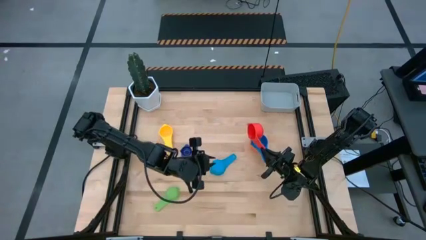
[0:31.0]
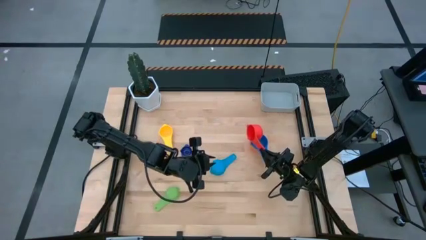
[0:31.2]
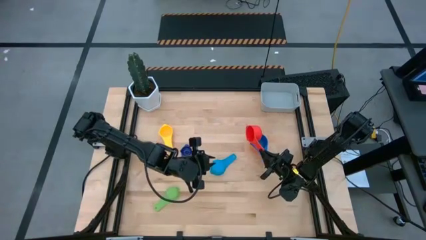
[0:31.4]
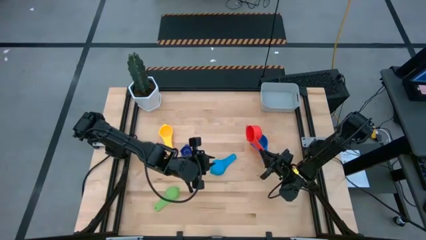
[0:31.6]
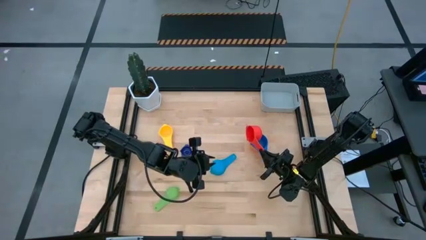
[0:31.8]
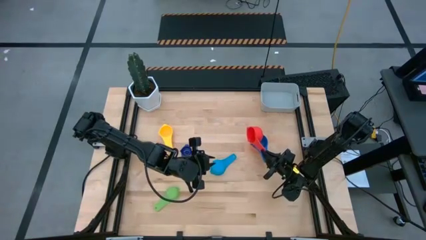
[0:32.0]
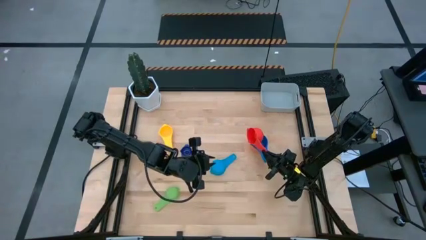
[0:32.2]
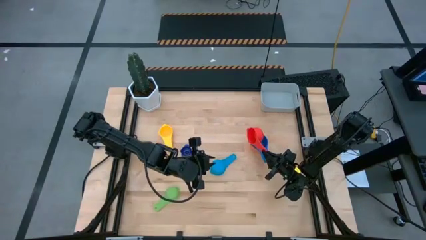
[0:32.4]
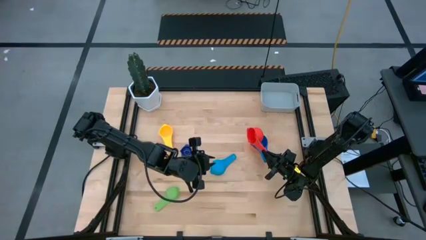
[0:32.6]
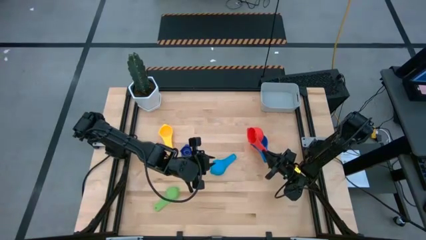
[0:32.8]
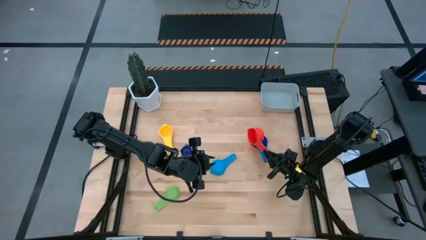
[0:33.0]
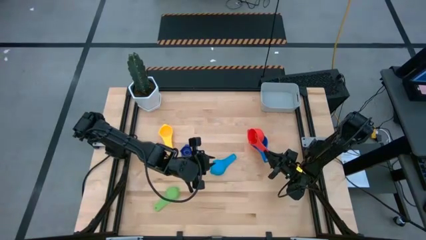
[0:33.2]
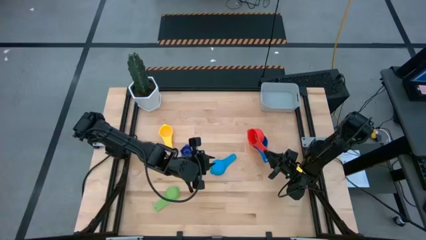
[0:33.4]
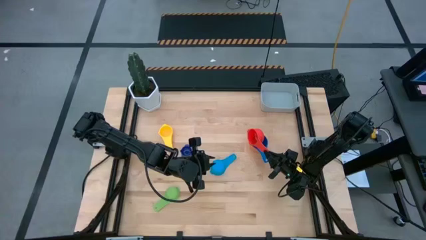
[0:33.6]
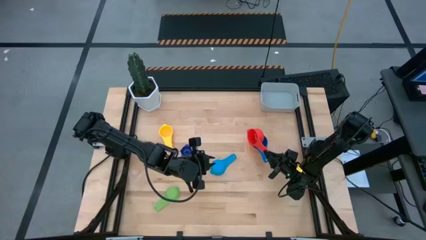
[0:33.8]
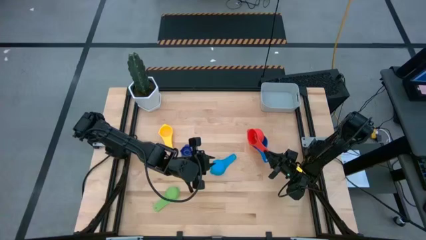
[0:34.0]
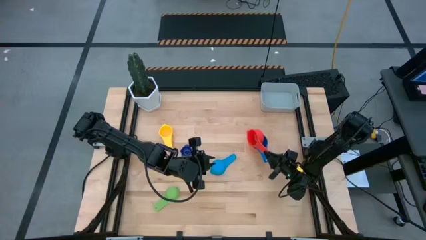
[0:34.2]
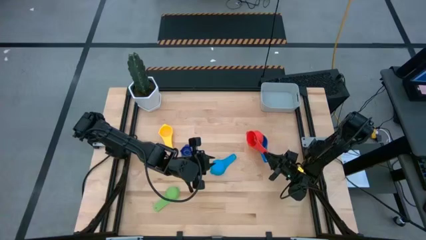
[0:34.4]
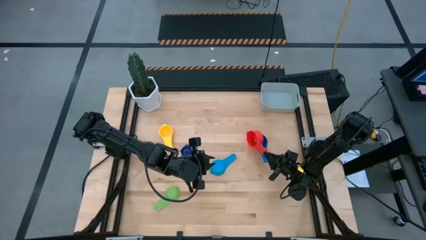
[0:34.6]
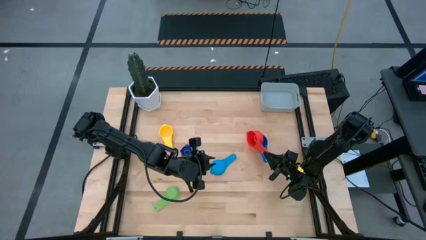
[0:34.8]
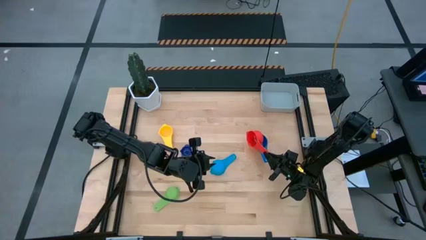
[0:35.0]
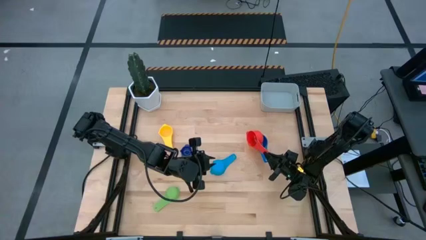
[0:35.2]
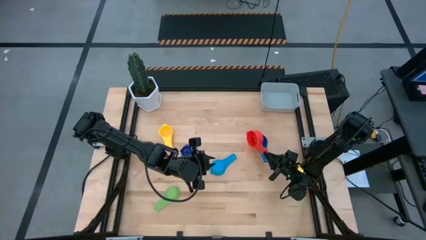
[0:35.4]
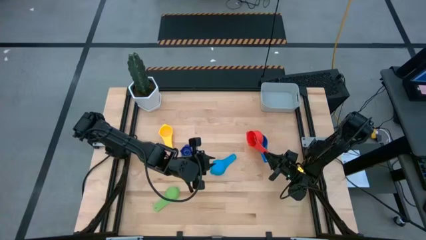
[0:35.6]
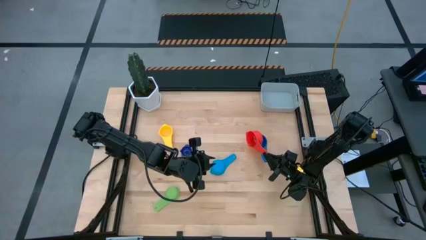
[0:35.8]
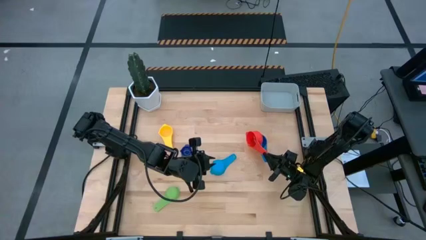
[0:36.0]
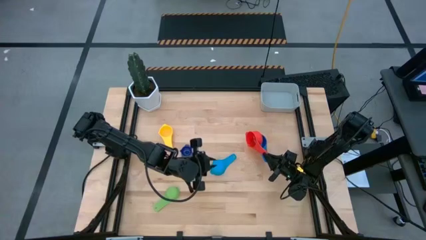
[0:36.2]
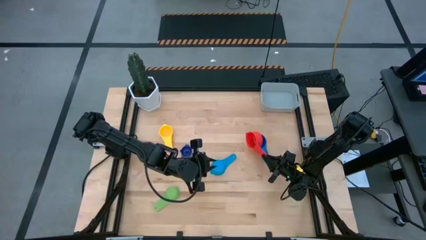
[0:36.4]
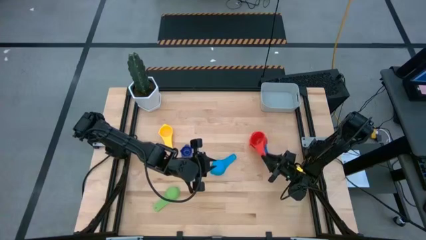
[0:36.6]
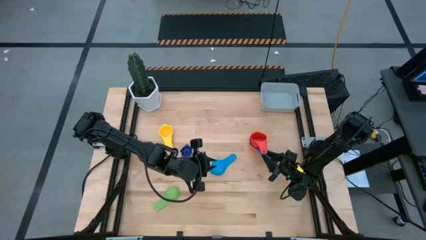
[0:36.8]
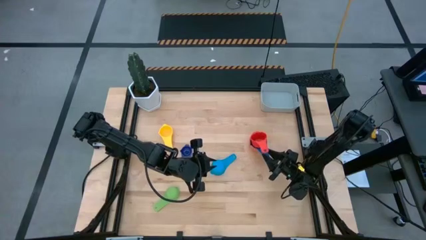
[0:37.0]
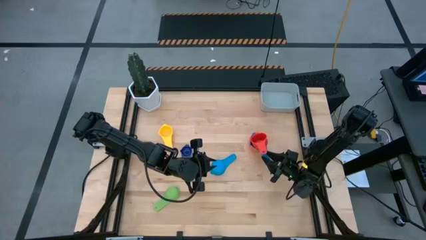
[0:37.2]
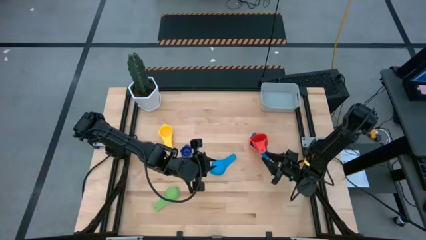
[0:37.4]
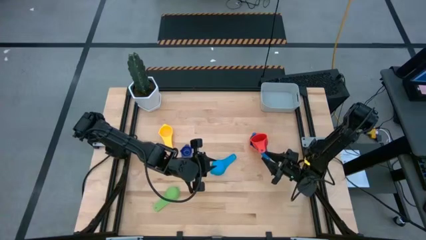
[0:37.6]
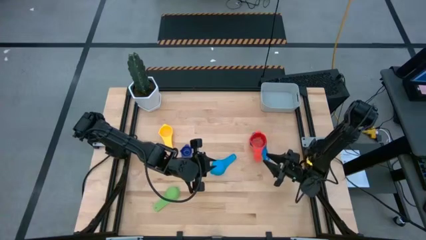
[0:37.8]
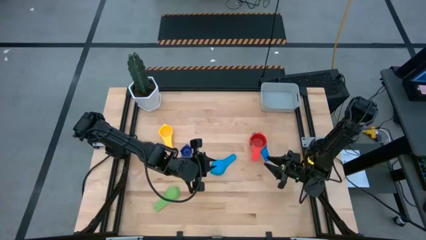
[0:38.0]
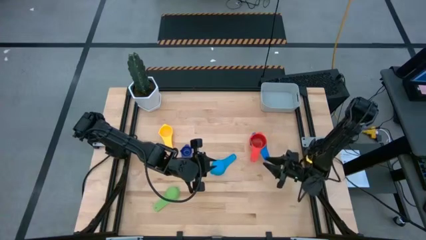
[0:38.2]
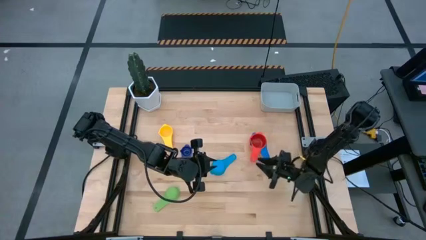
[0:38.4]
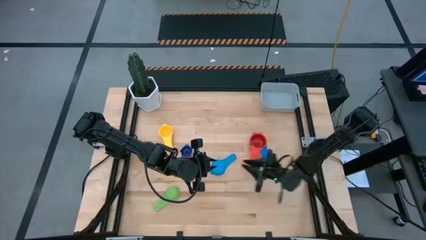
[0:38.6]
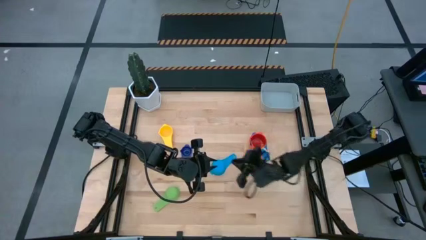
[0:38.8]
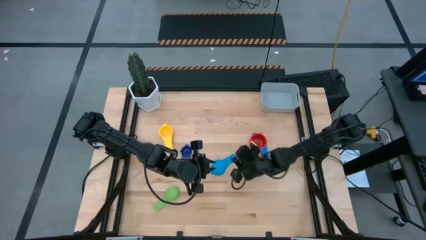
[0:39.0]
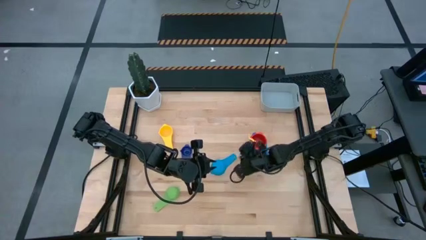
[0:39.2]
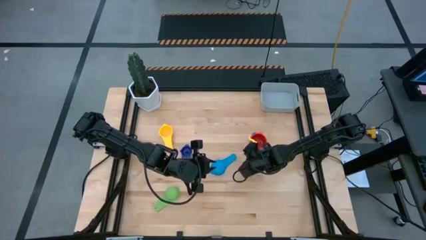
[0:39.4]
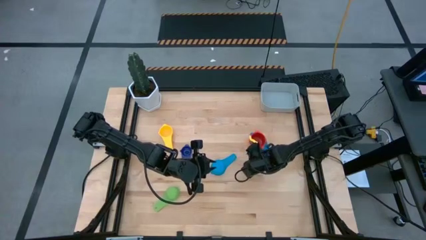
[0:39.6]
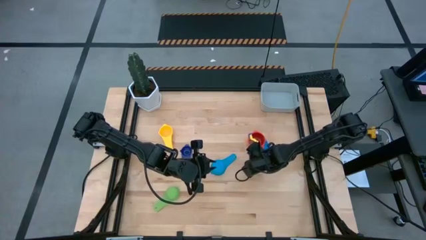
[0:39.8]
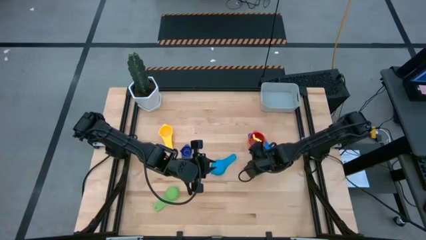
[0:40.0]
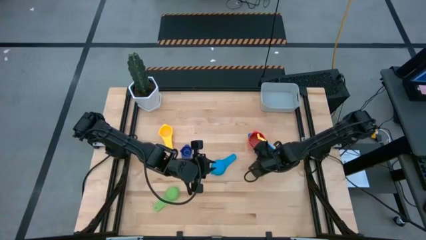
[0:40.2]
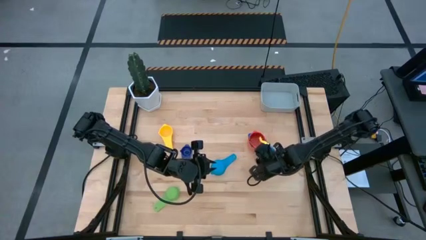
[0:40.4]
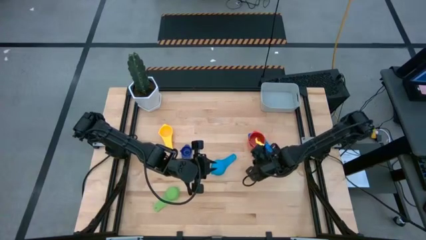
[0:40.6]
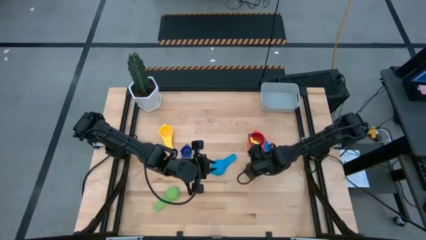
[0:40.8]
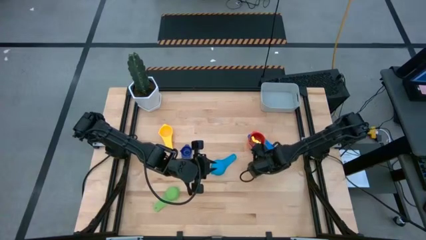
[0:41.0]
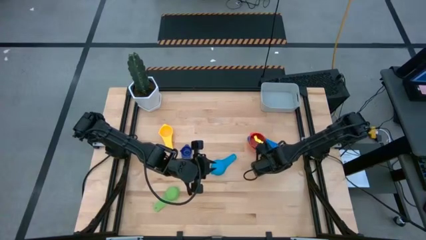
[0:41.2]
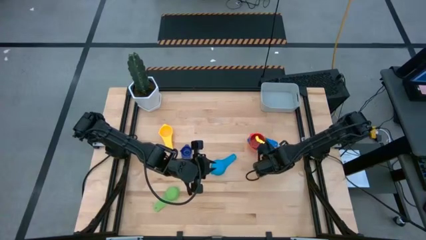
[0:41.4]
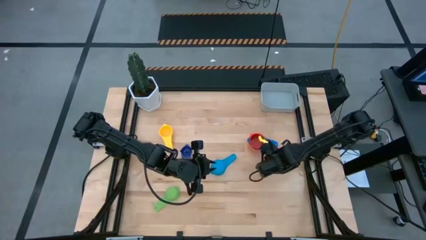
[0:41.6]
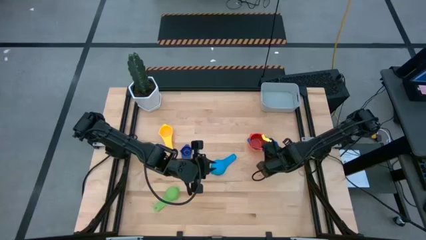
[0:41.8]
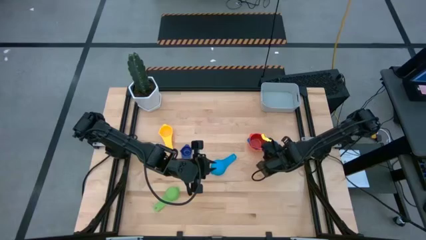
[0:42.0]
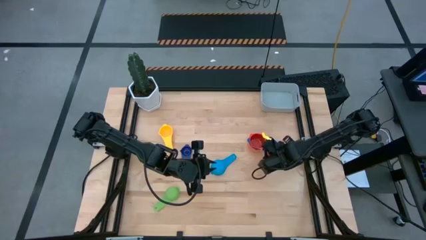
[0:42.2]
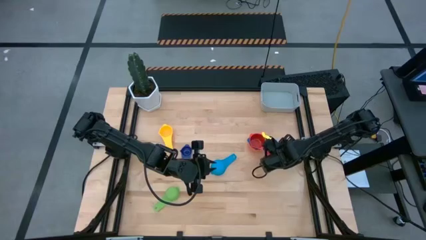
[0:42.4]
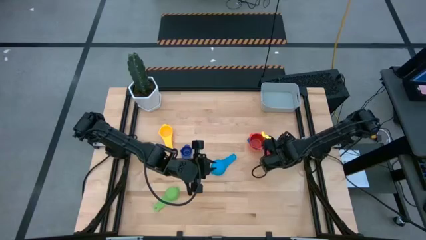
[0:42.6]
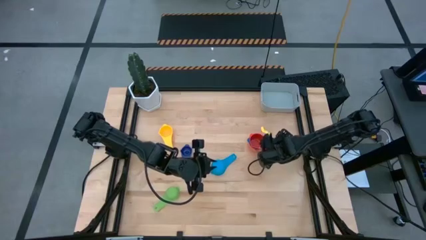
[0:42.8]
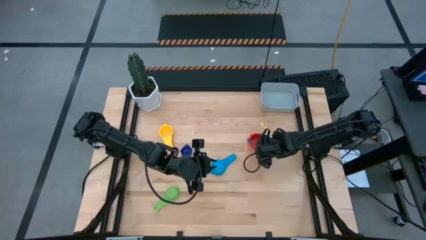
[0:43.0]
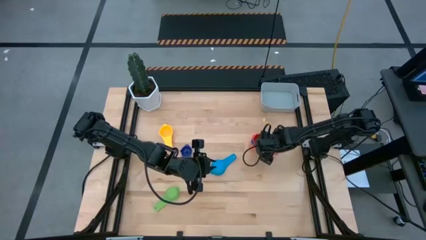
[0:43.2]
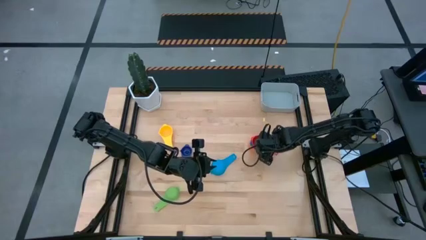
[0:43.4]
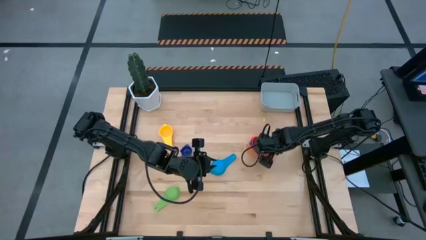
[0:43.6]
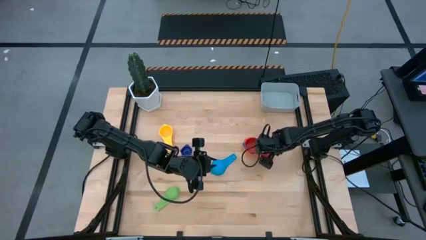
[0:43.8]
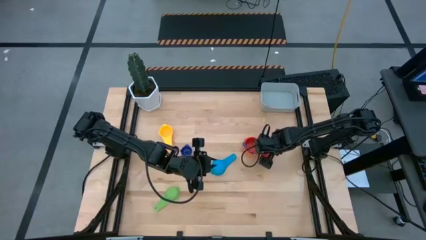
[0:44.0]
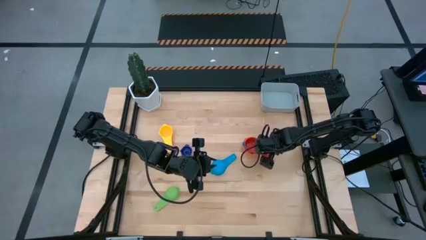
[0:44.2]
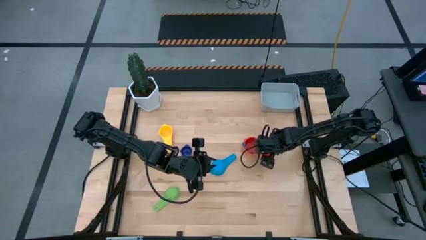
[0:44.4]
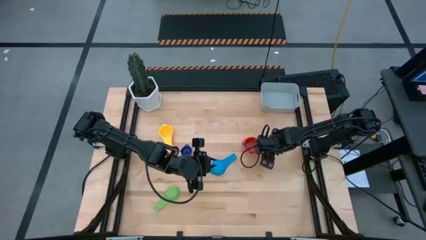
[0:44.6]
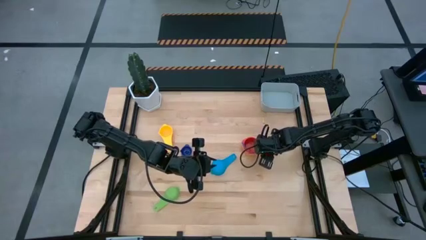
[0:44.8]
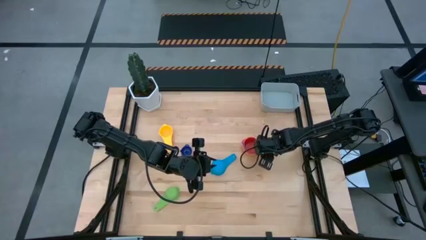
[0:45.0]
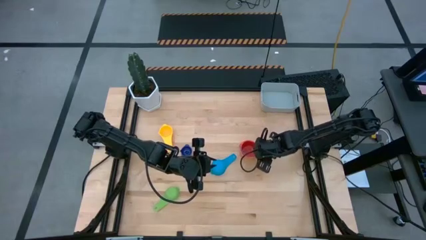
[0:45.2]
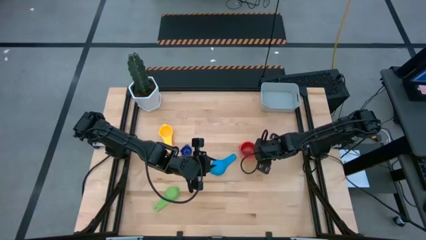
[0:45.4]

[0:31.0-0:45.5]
Task: Nest measuring cups in basket
Stack the red measuring cup on top of the blue measuring cup
